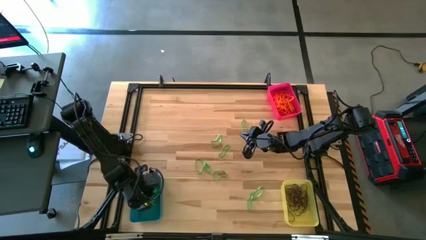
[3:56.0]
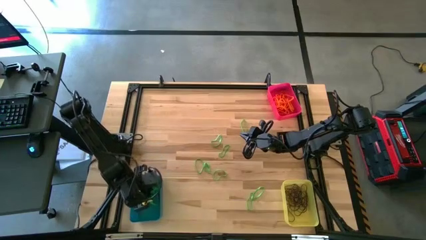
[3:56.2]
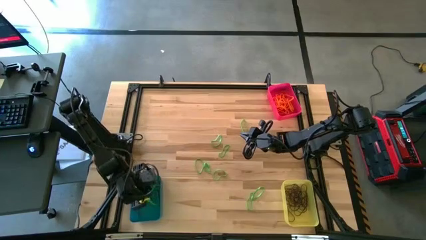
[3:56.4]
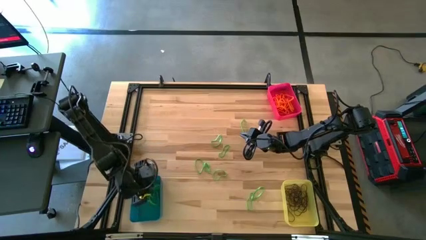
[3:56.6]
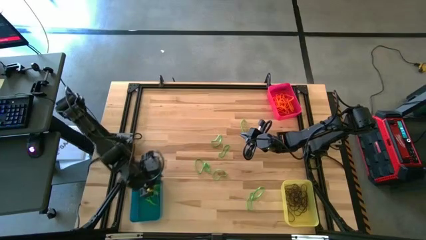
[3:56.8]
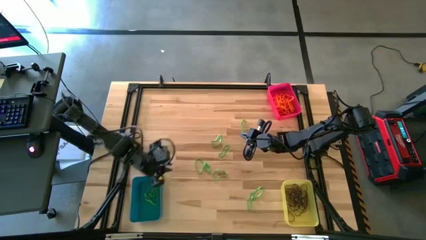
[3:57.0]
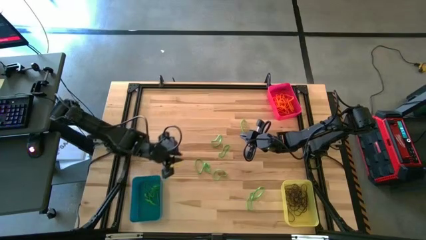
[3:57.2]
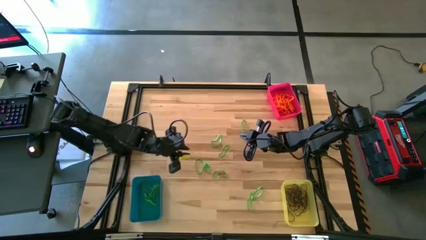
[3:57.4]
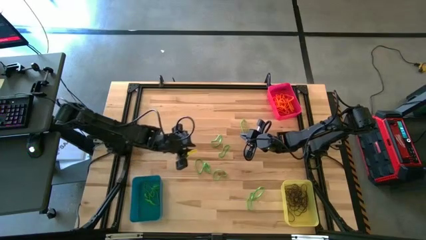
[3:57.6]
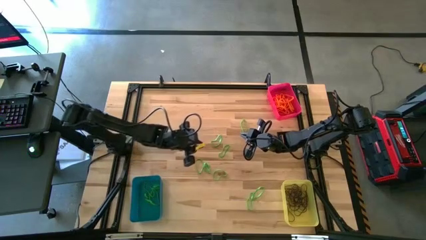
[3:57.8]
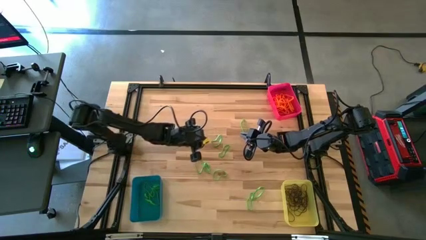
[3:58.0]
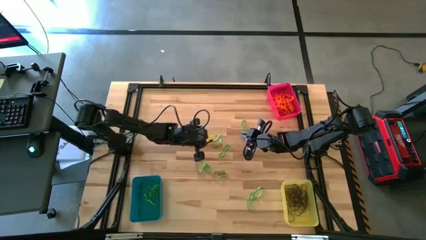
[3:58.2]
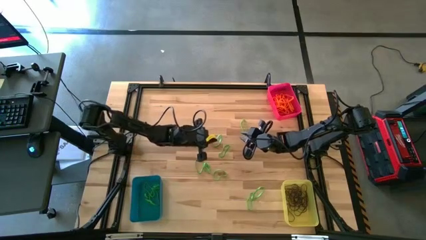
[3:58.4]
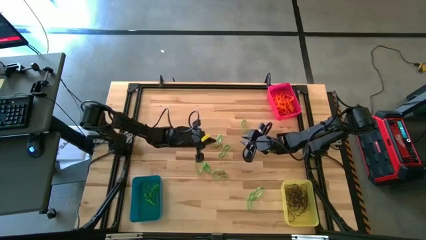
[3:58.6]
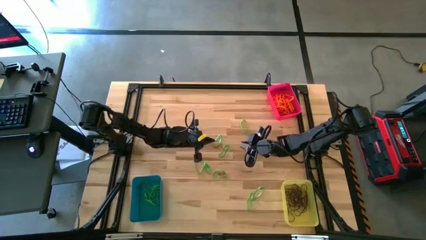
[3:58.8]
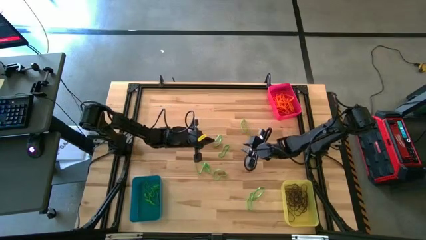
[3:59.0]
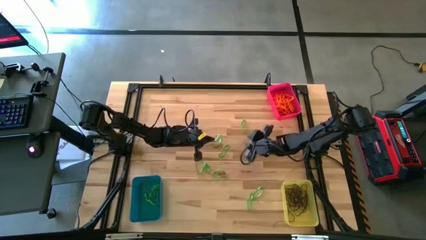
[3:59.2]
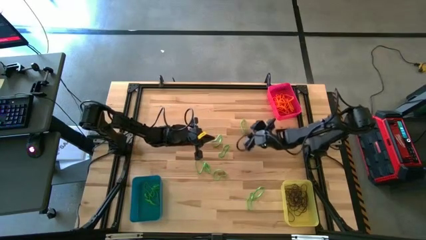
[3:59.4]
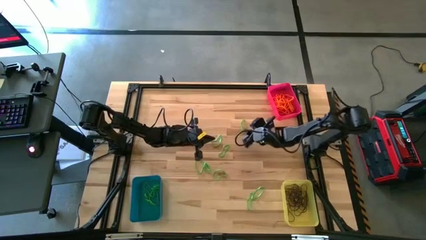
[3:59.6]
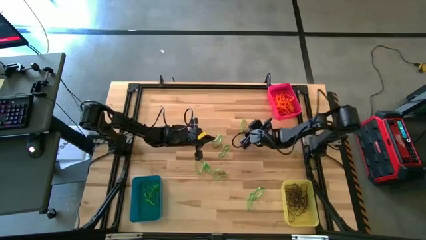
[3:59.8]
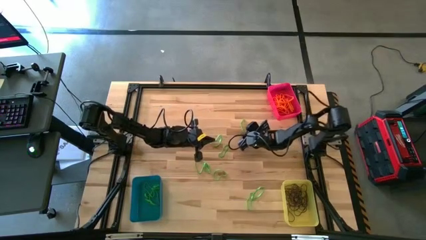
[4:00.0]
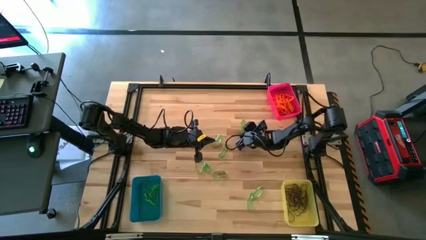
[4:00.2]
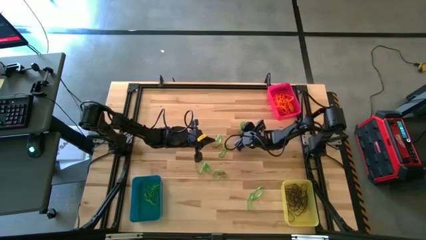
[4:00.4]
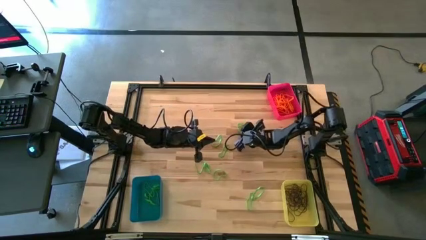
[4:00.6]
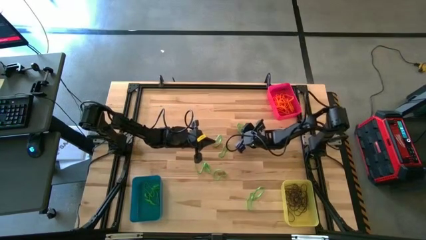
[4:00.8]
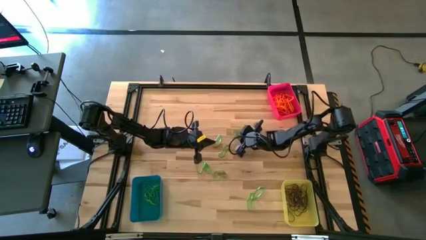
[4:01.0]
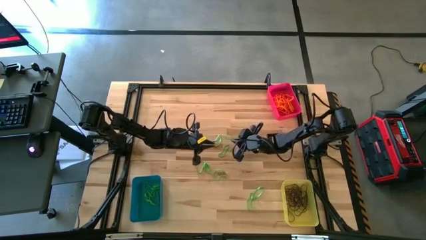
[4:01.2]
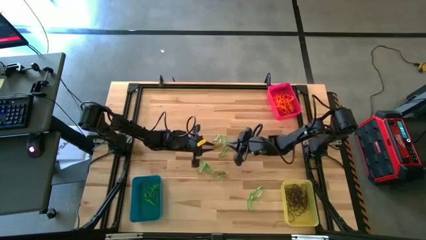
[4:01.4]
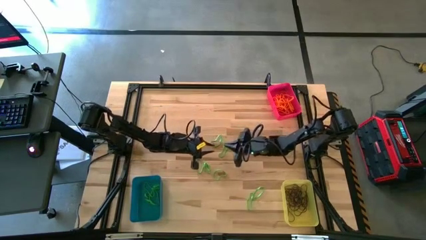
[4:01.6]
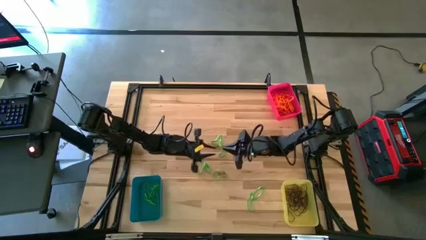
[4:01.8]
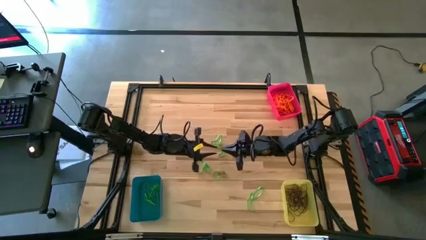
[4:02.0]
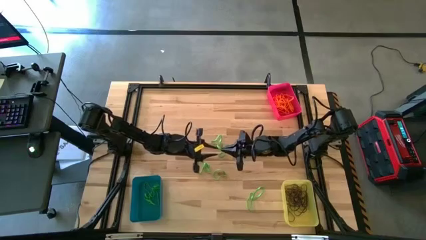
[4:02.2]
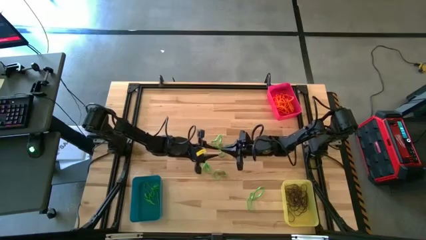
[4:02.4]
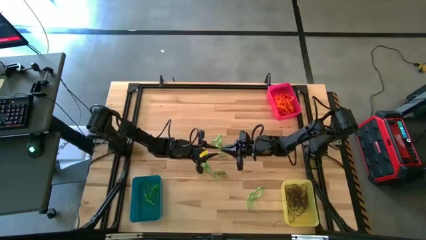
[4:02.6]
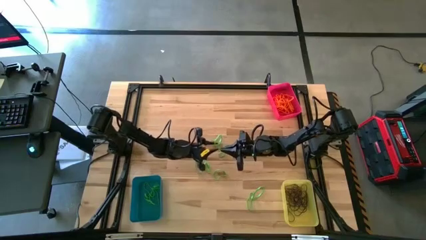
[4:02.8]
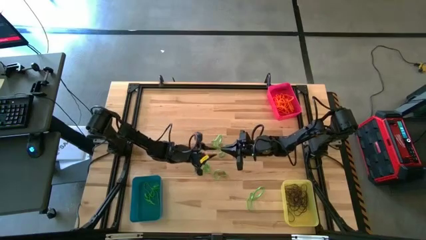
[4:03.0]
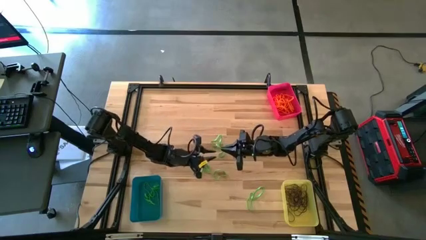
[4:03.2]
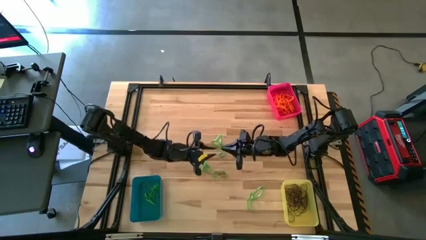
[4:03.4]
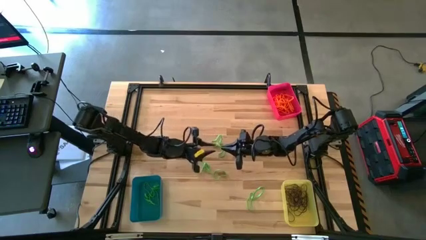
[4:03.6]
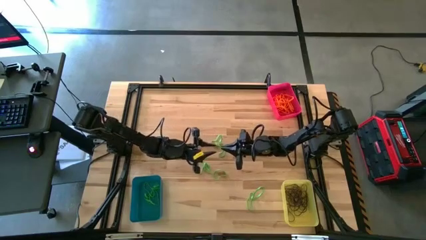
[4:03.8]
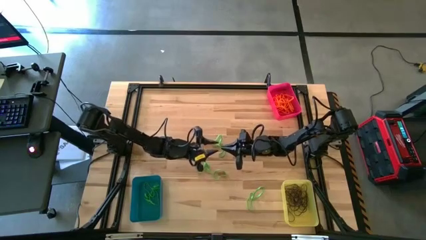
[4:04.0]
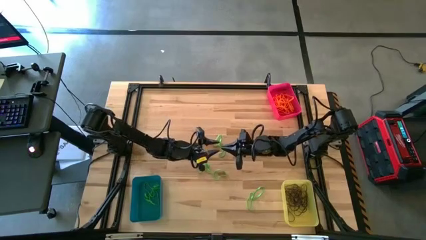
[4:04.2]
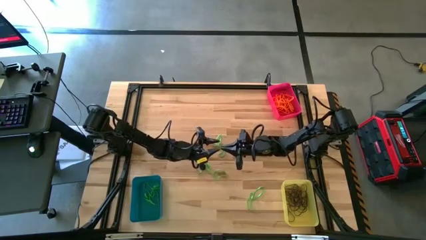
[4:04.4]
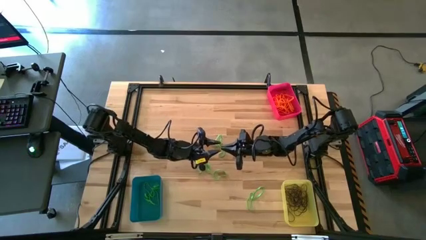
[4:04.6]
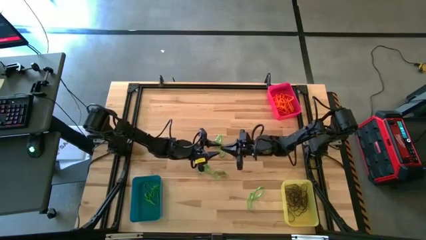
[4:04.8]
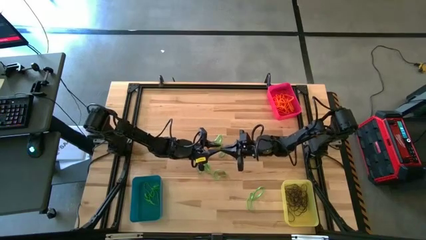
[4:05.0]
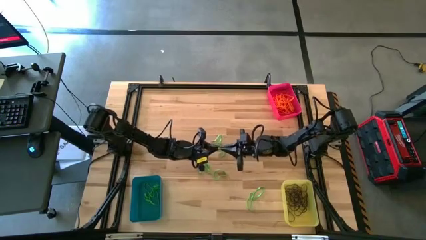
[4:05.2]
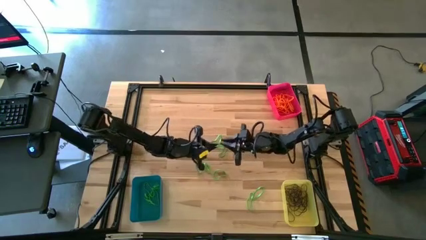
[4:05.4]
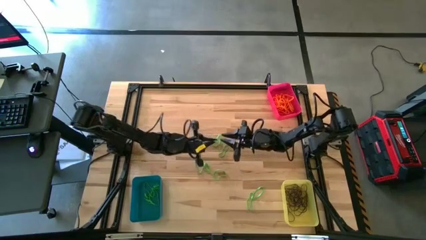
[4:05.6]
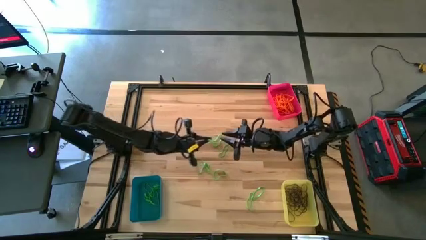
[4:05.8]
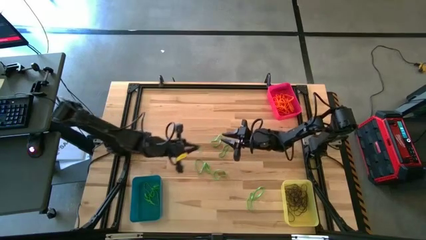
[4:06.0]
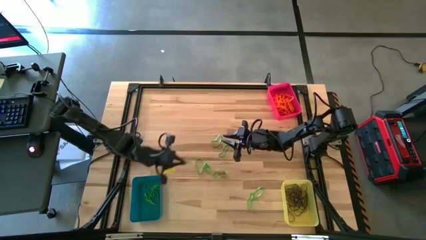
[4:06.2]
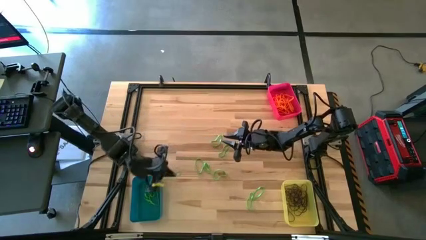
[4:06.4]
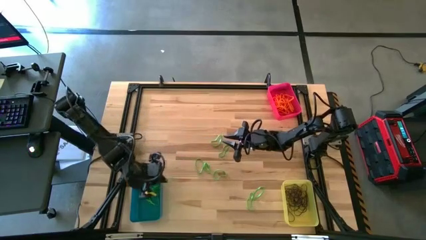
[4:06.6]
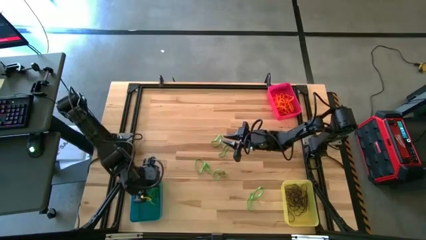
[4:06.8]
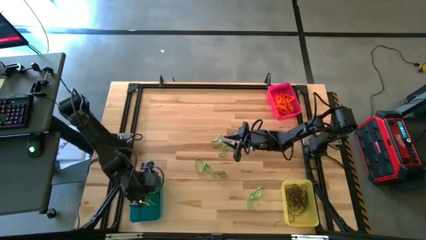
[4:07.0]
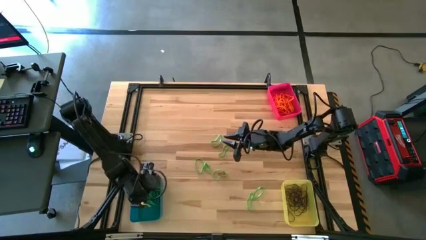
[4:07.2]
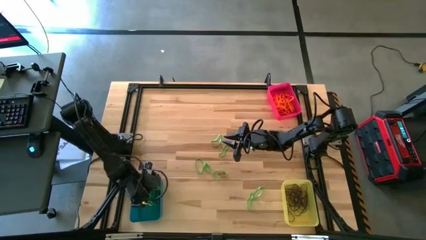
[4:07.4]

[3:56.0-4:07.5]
Task: Sort rubber bands into baskets
Put the green rubber band into the blue bin

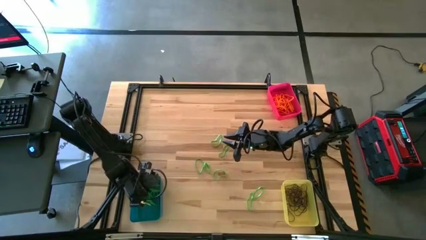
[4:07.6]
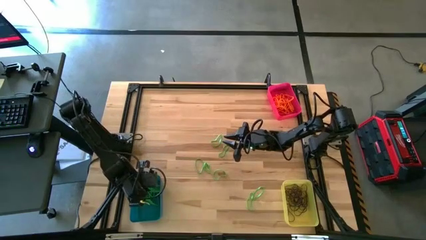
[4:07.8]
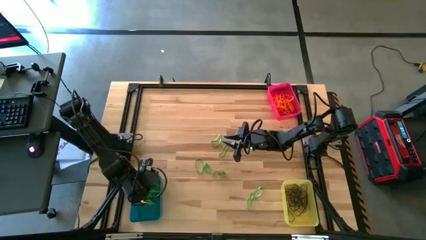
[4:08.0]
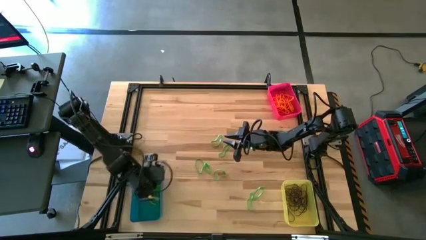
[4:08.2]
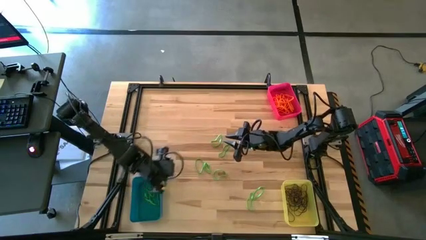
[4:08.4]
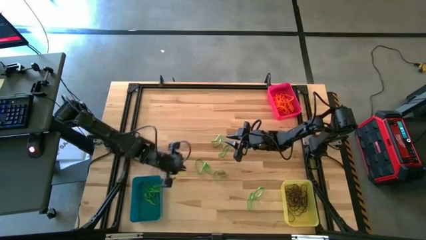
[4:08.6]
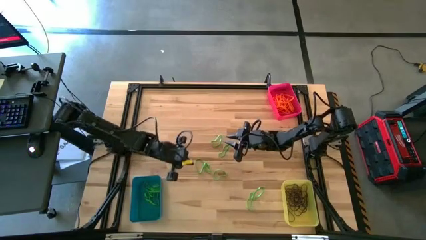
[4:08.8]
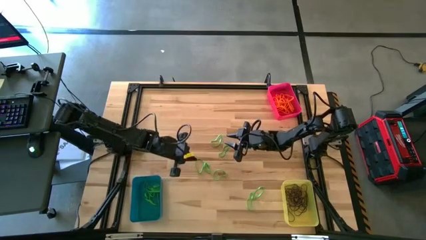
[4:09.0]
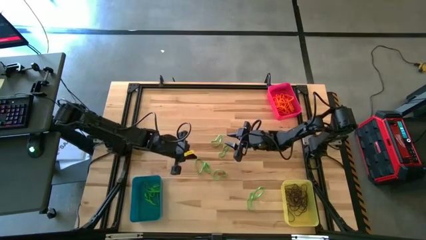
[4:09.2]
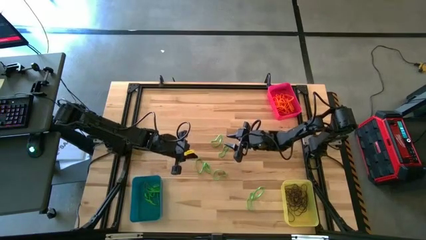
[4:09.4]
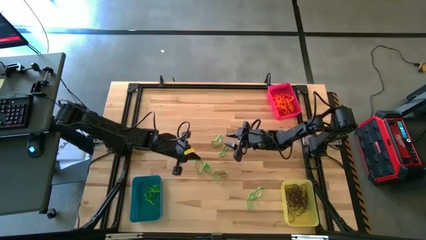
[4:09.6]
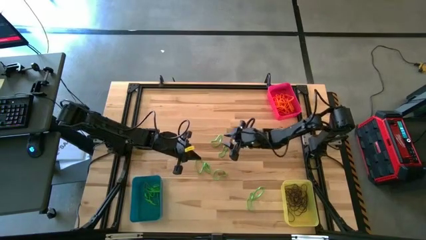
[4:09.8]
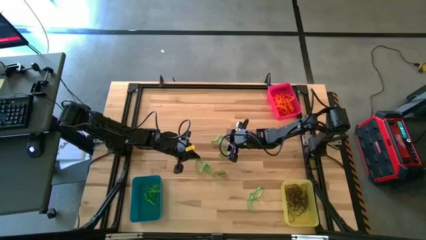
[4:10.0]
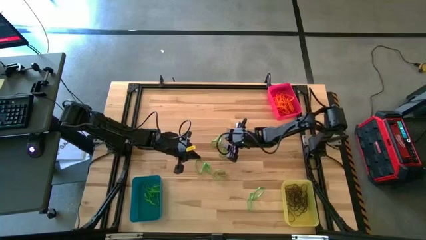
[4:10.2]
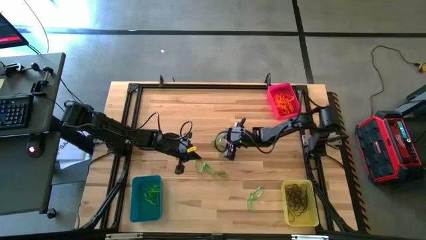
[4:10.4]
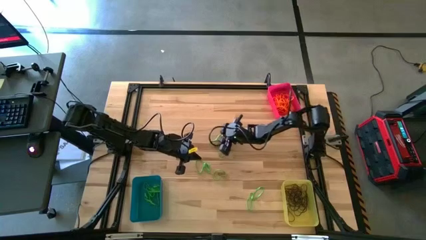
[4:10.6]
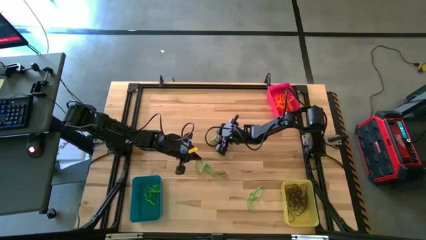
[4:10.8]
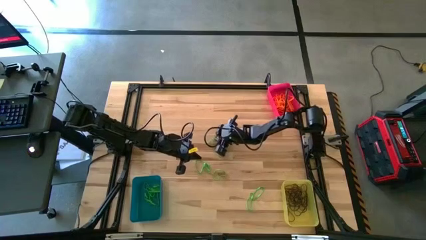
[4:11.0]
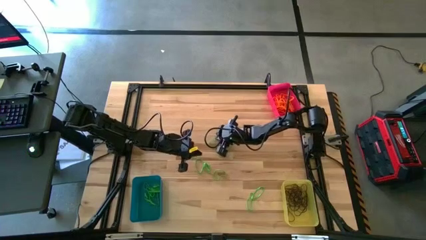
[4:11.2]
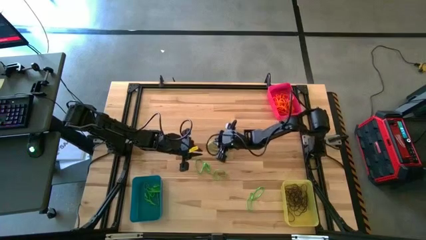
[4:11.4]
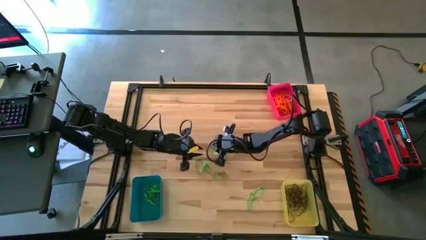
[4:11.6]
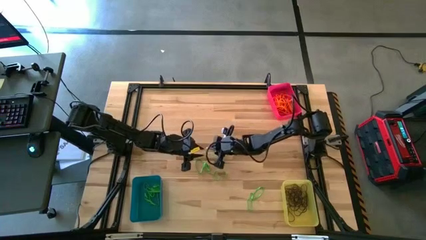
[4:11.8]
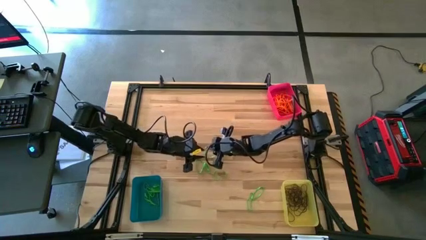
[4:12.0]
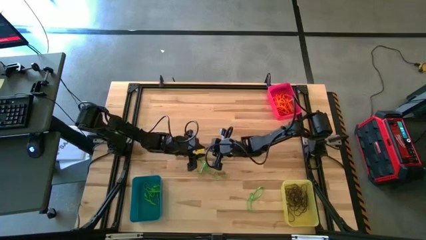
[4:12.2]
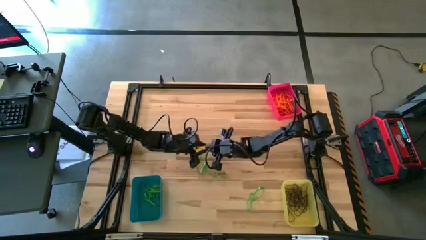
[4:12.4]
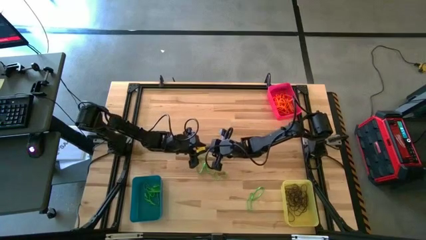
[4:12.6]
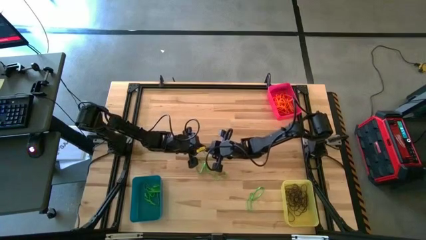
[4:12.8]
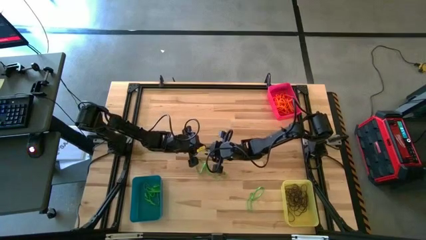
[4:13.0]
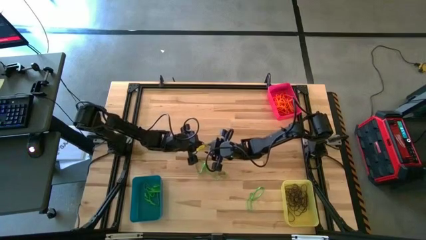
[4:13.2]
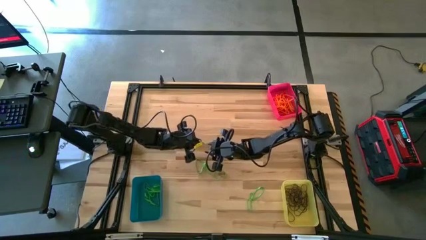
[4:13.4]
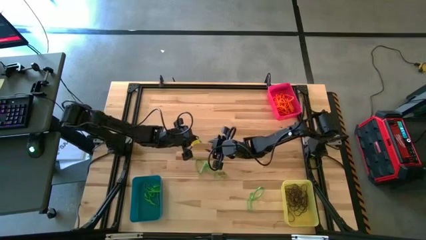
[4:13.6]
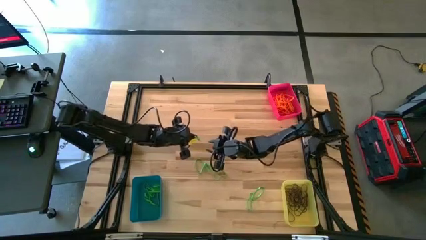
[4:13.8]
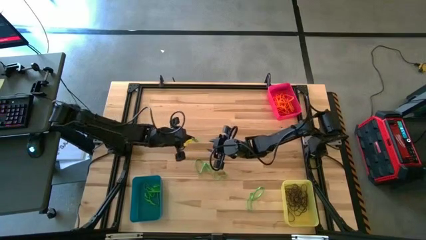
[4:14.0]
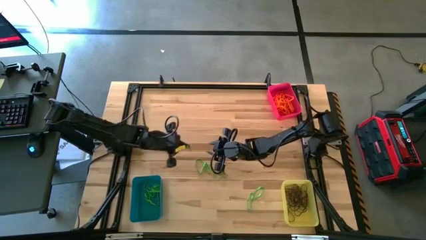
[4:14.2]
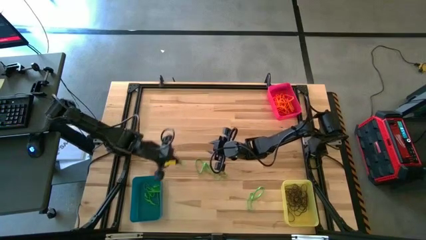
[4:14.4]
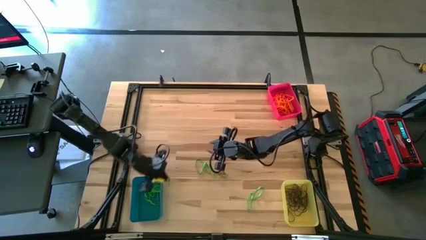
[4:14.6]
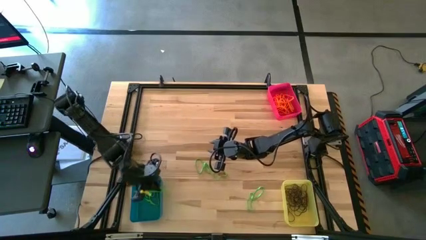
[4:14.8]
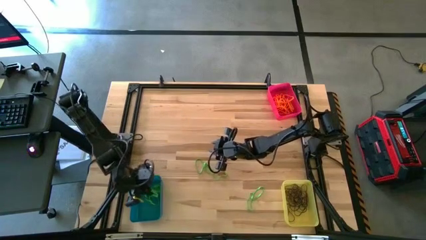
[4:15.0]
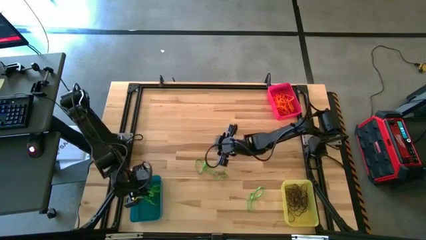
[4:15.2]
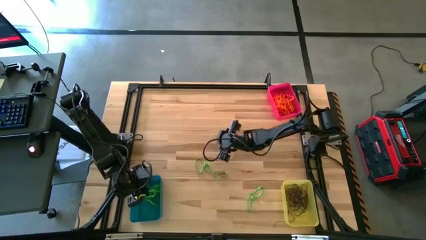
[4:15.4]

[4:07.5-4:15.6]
Put the green rubber band into the blue bin
